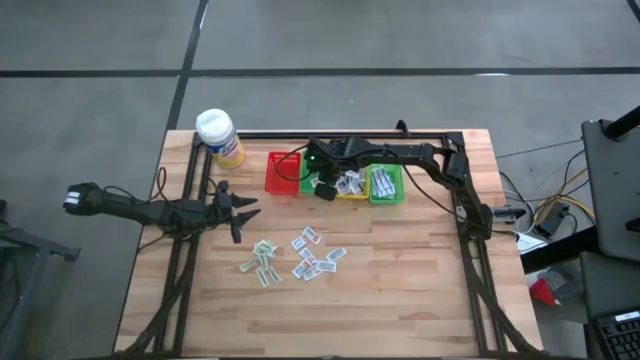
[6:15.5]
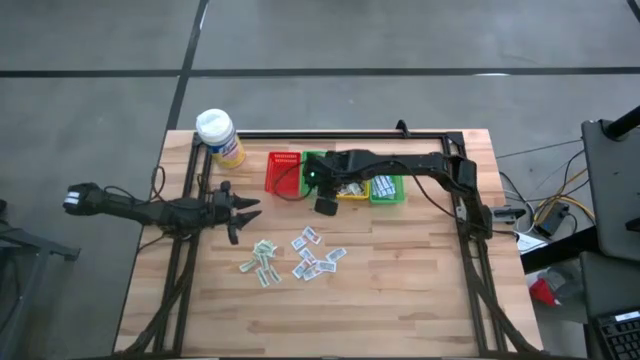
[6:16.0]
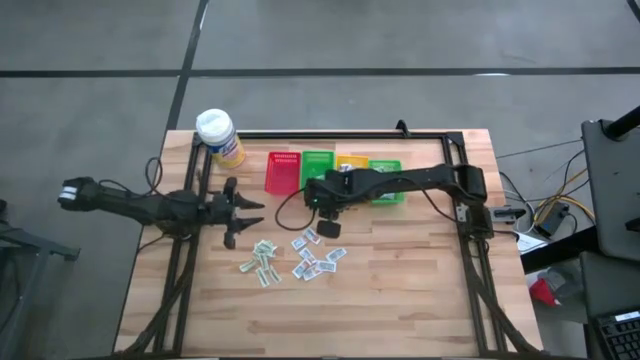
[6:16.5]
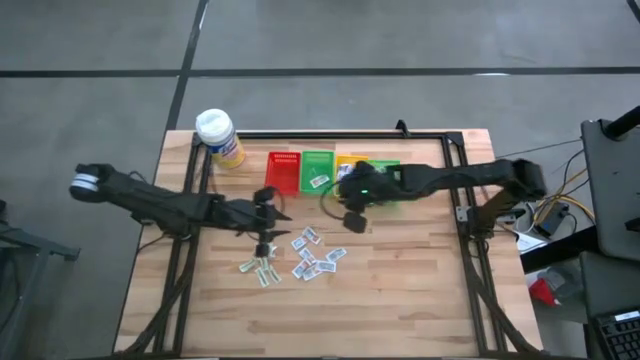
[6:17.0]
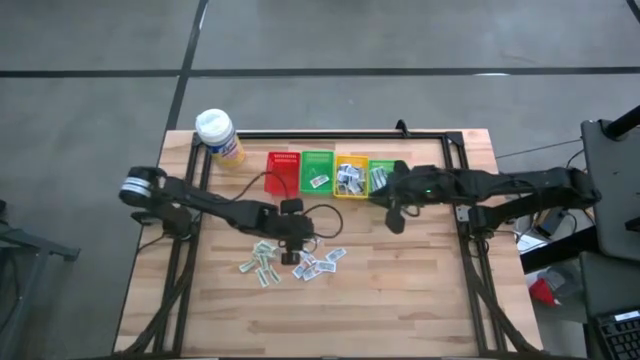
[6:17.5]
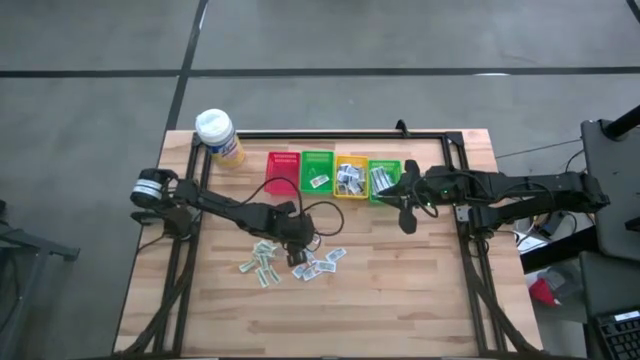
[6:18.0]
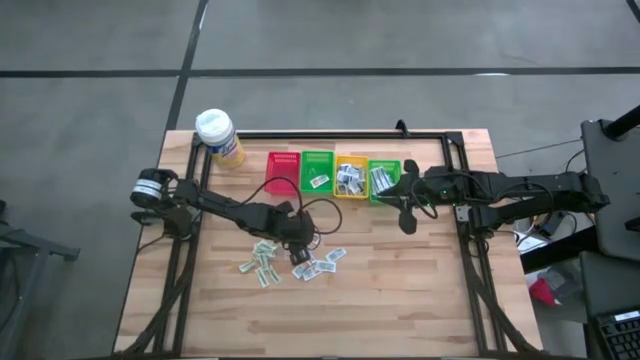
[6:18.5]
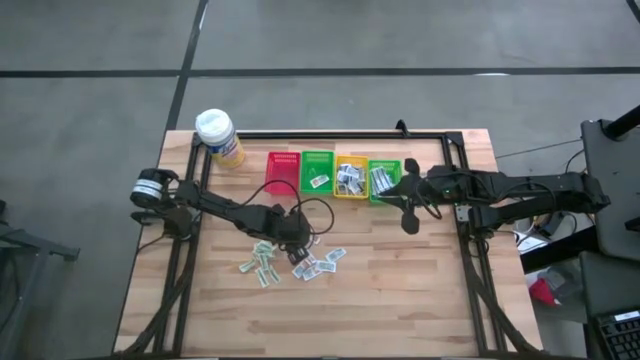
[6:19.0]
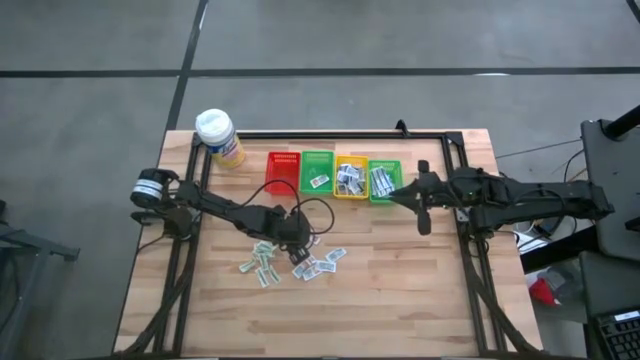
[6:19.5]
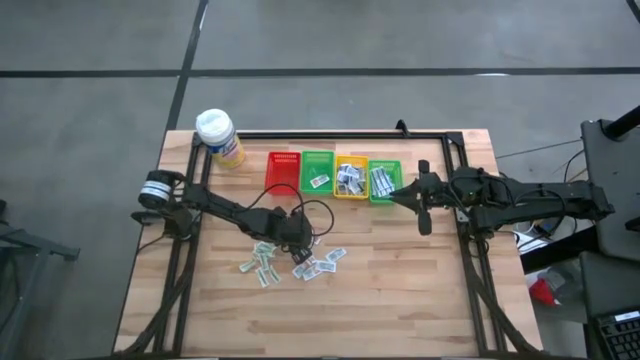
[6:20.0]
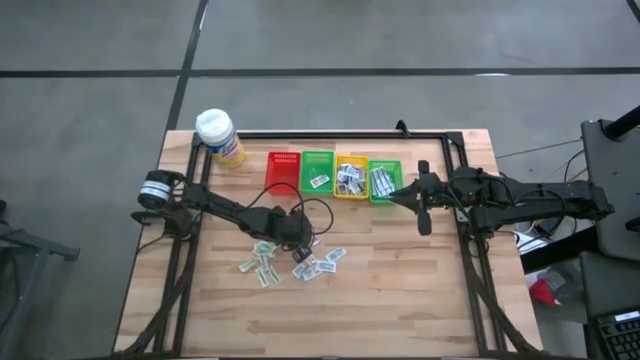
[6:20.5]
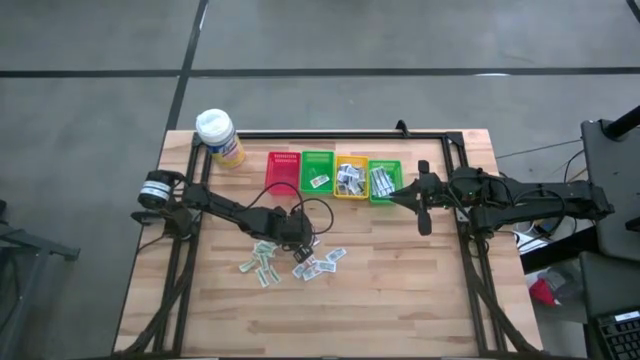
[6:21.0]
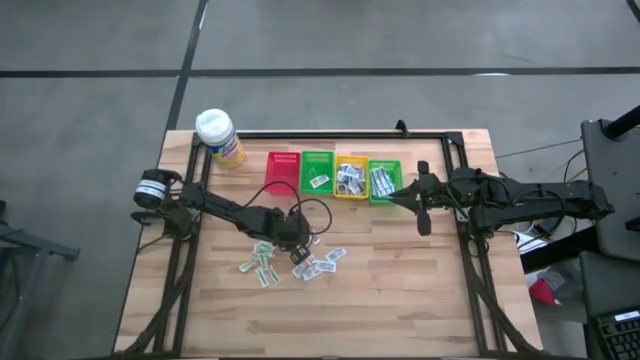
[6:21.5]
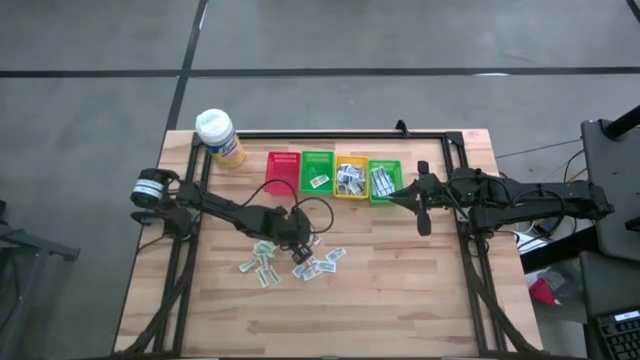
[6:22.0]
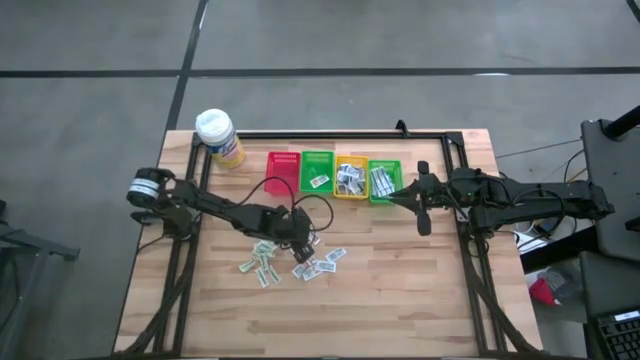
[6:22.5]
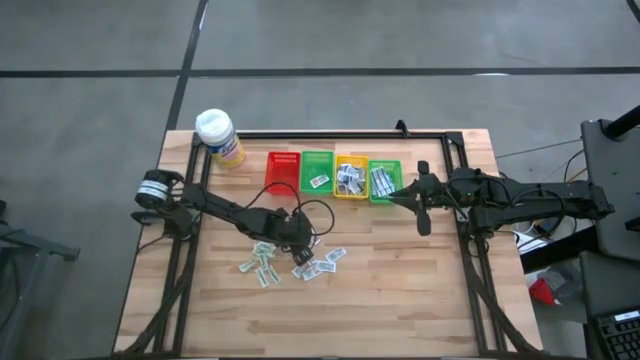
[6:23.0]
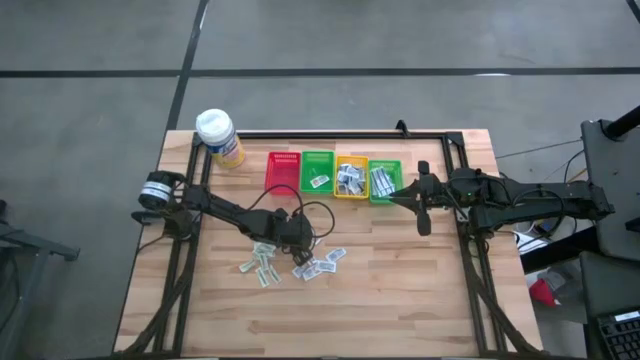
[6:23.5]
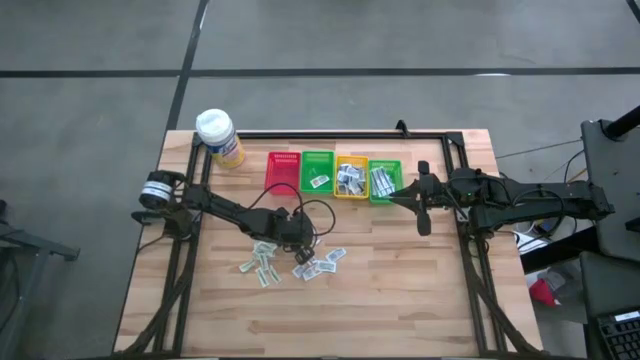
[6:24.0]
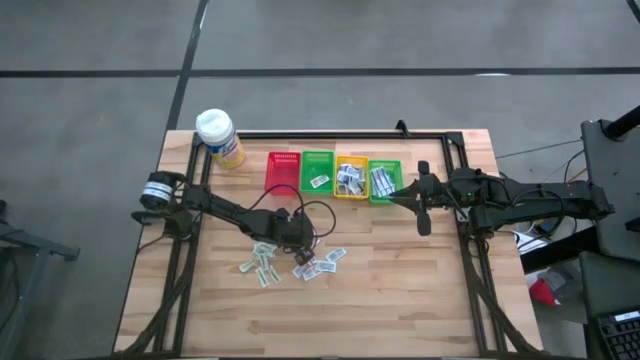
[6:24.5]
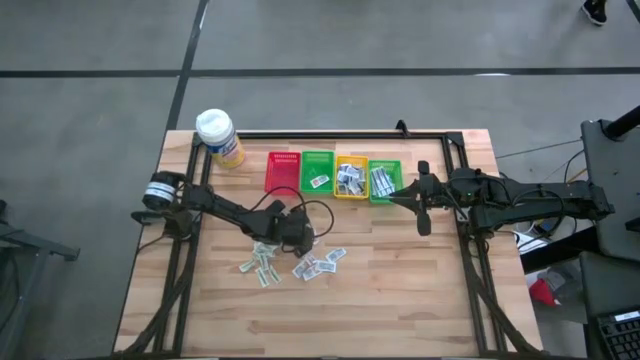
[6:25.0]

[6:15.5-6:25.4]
Task: Pick & Place First Aid Supplies
Put the orange ointment pack into the left green bin

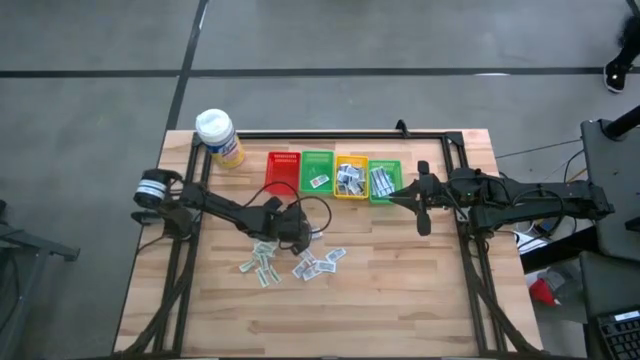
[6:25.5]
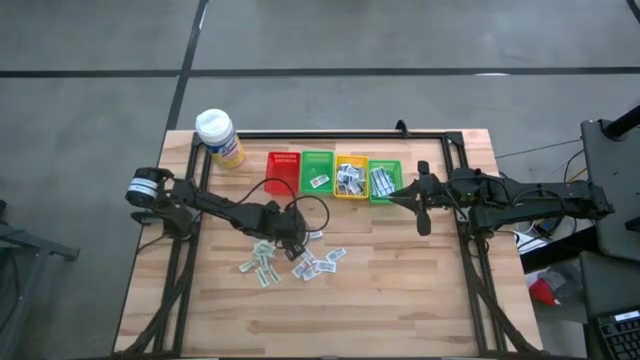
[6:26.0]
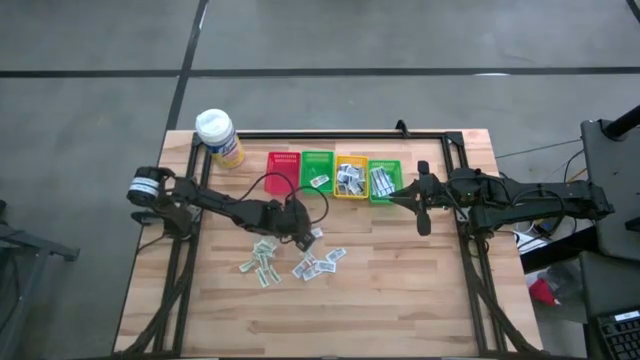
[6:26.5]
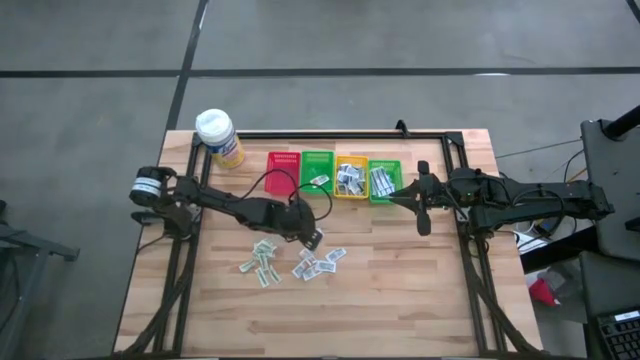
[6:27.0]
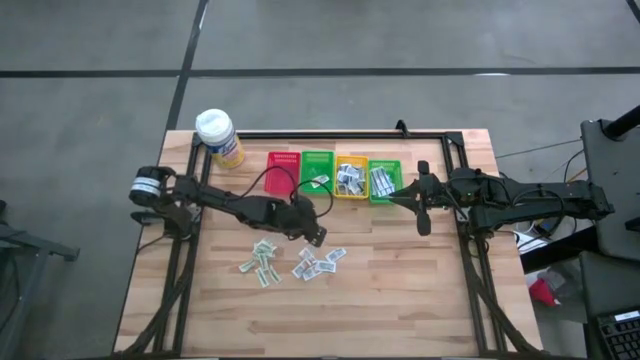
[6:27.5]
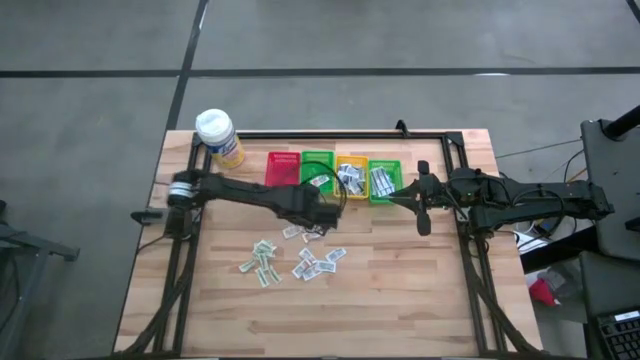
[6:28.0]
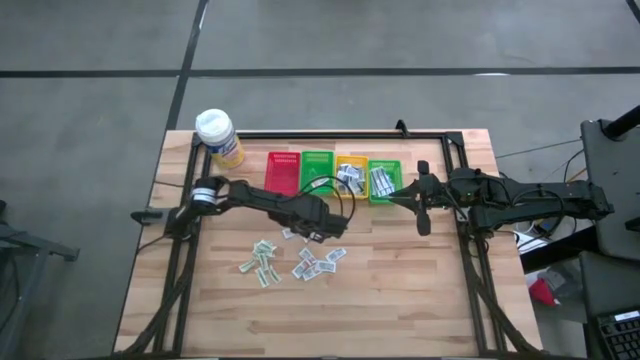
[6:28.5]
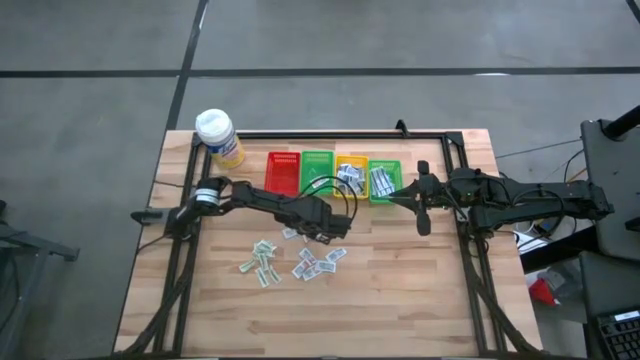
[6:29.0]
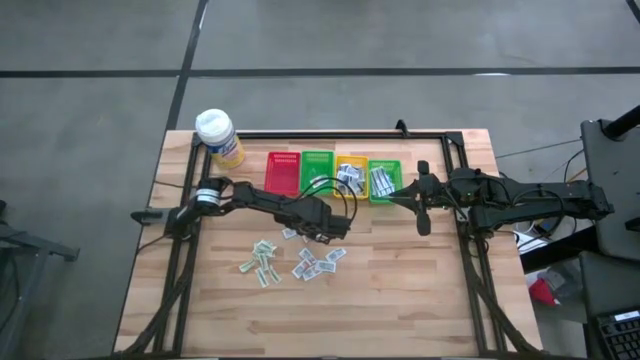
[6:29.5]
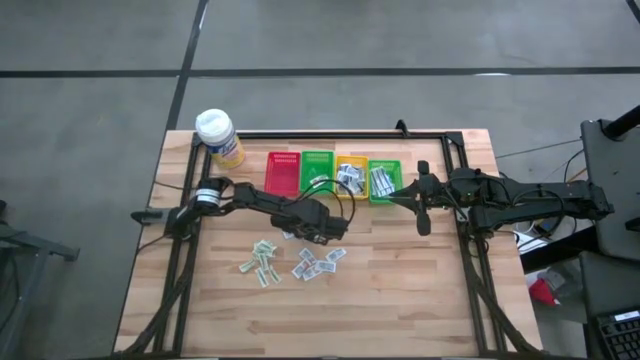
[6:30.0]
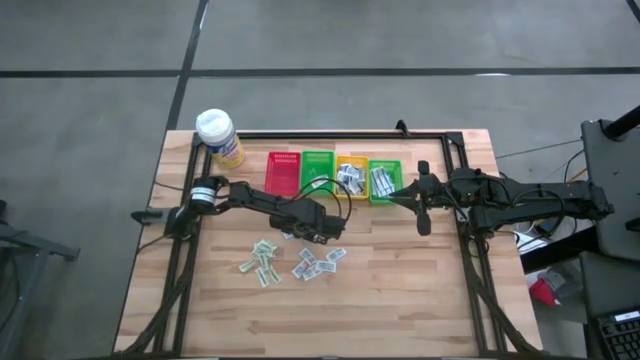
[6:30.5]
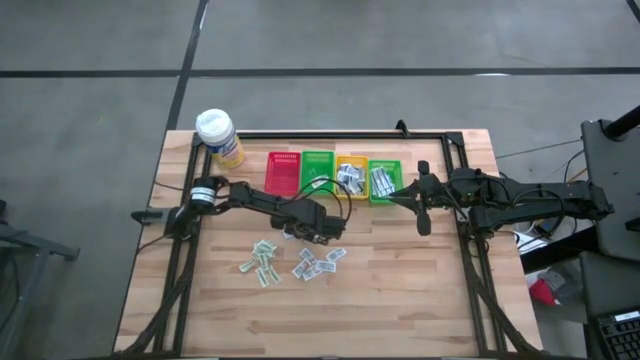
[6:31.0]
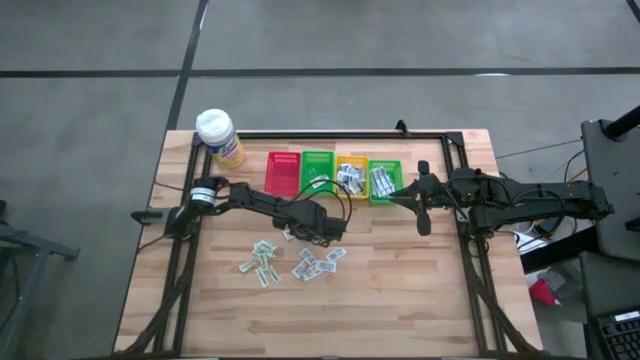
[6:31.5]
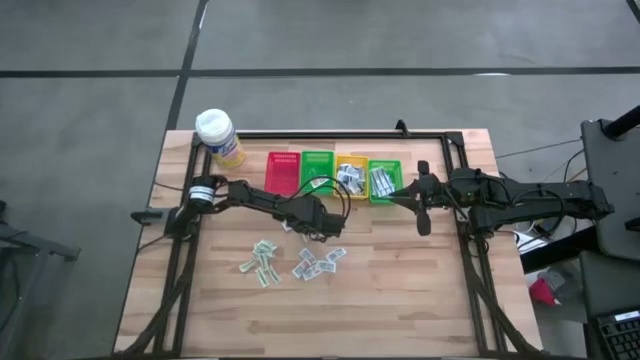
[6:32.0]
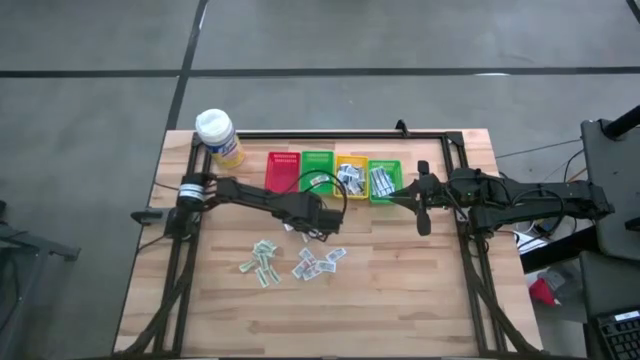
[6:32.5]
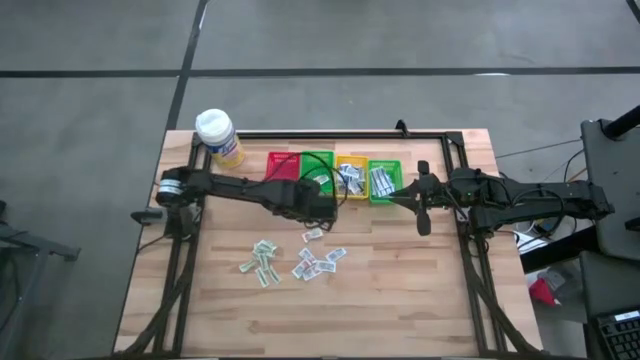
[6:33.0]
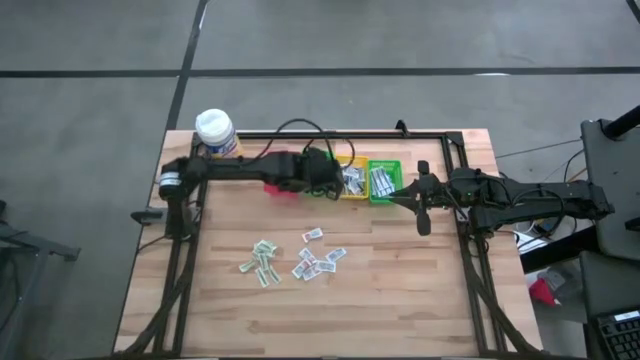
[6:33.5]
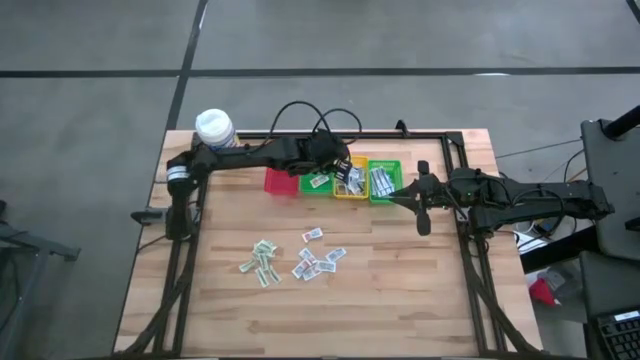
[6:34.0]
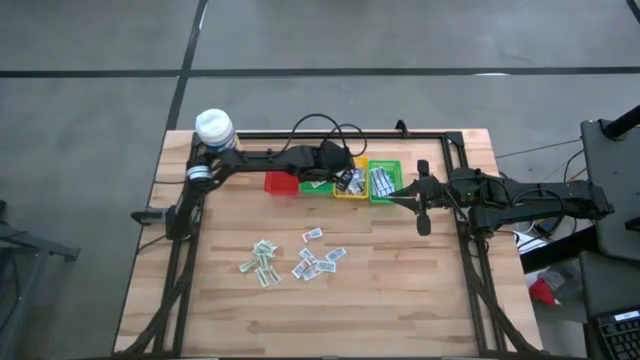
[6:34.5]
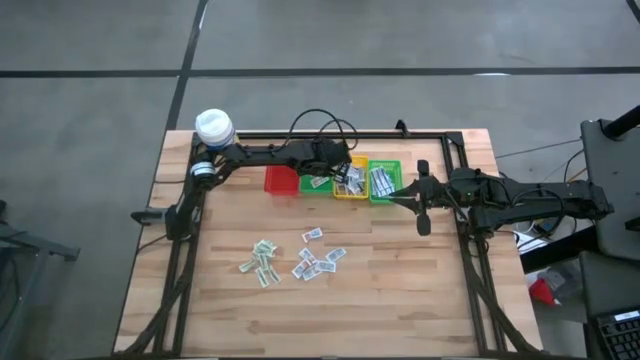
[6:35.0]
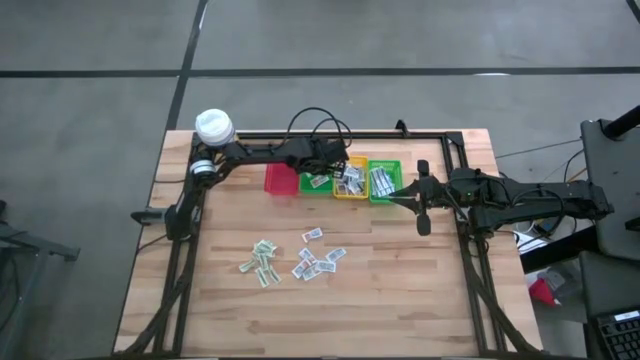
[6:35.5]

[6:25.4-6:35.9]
Put the orange ointment pack into the left green bin
